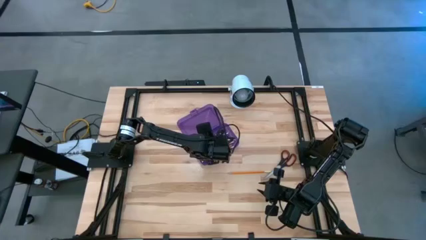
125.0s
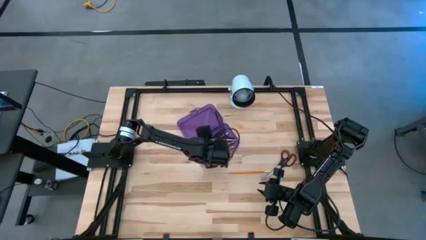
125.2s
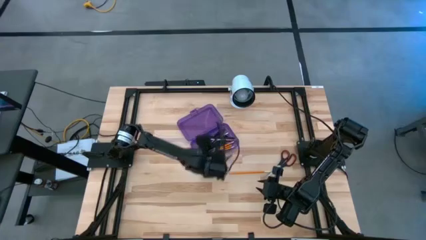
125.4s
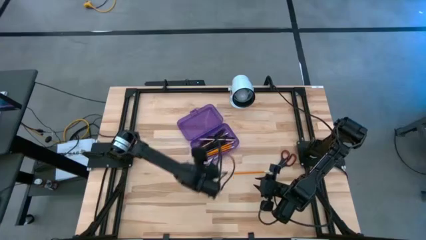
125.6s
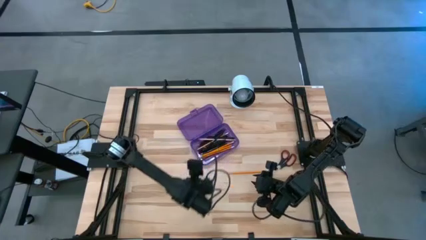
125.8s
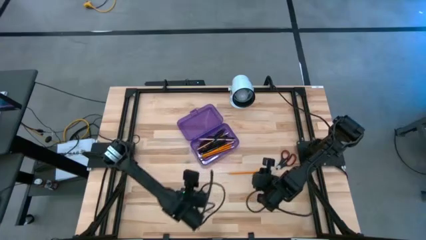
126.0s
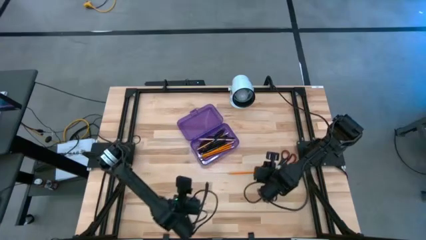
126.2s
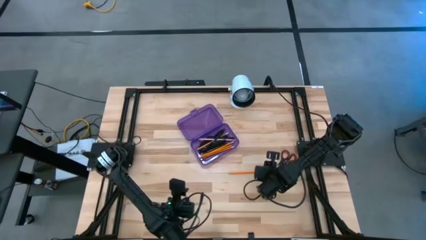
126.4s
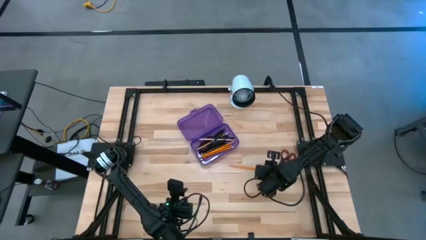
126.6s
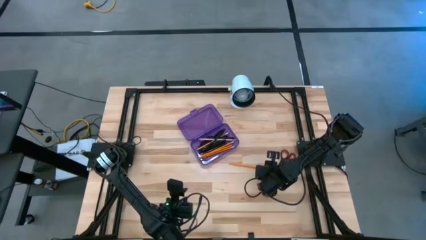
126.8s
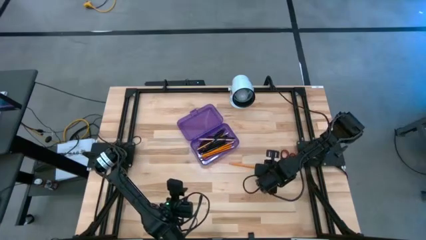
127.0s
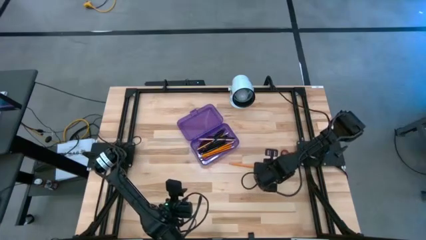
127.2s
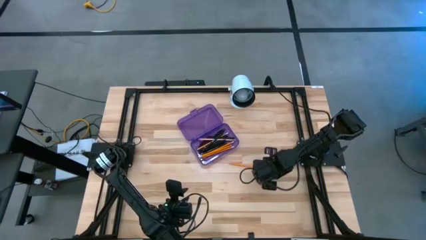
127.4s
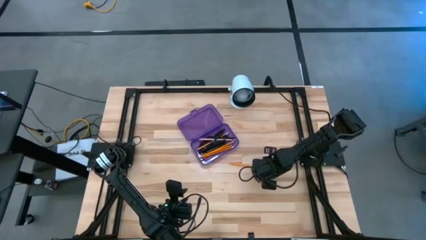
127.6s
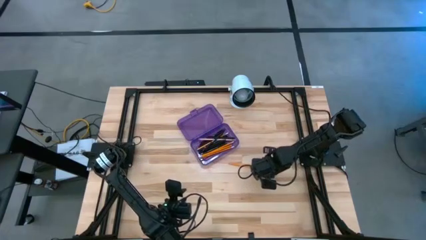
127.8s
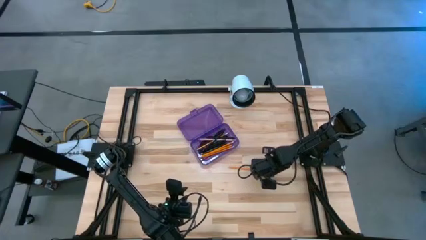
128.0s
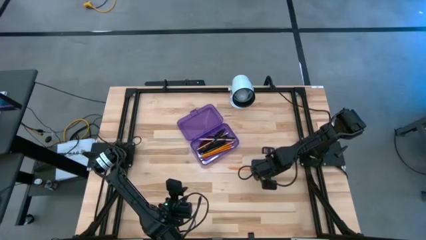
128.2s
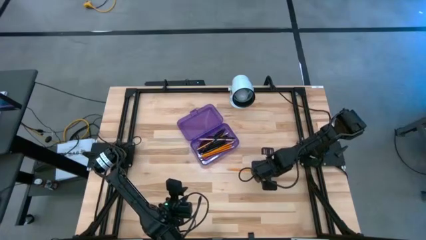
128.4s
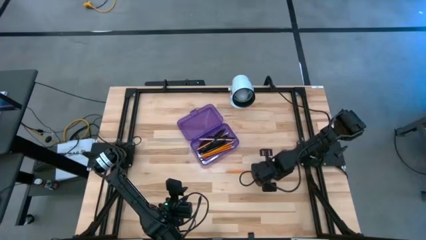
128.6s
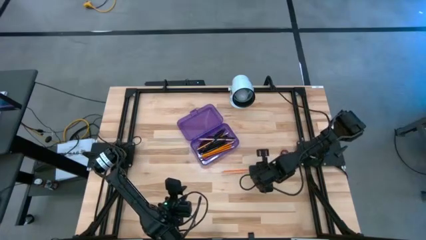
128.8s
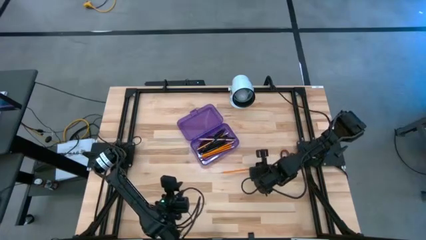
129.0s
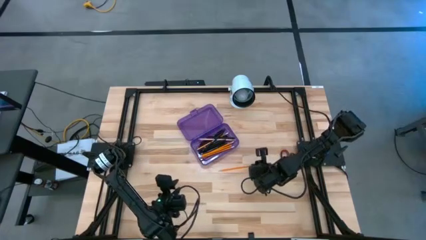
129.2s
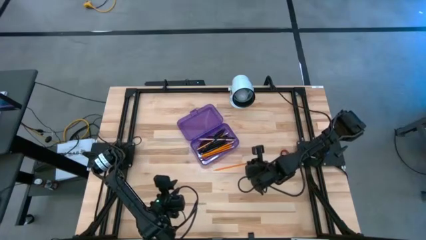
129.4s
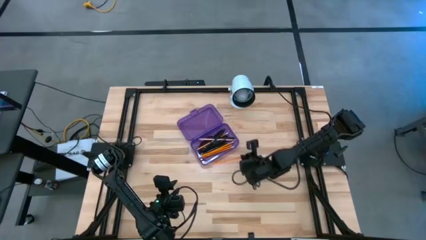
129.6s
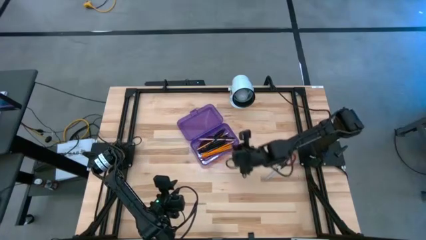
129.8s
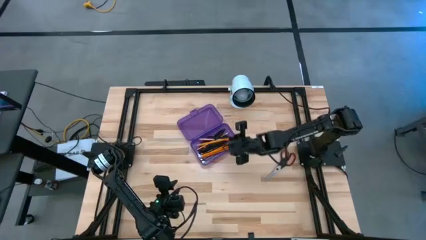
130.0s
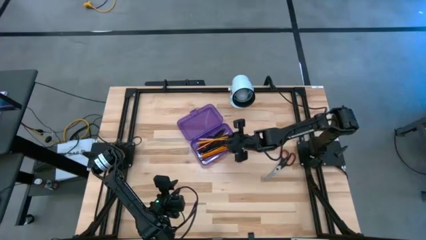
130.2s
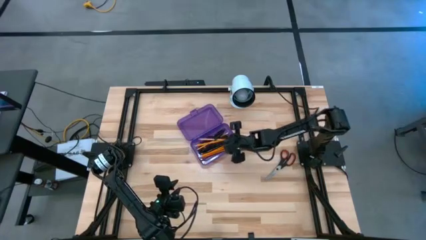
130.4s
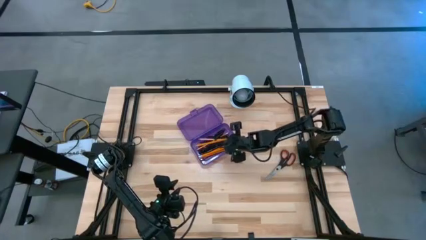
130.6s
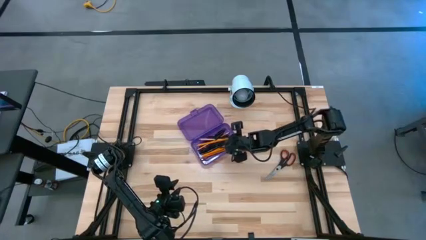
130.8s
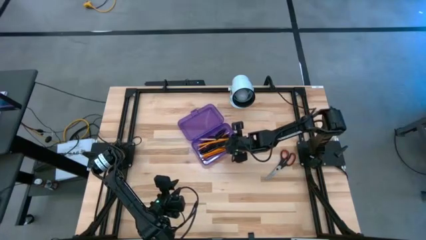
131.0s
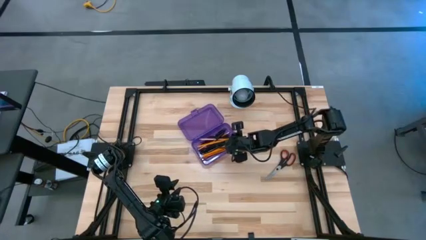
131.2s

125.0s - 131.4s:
Task: Pick & place school supplies into a supply box
Put the orange pencil into the purple supply box

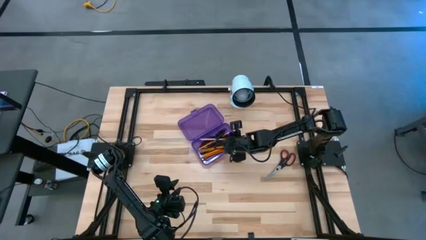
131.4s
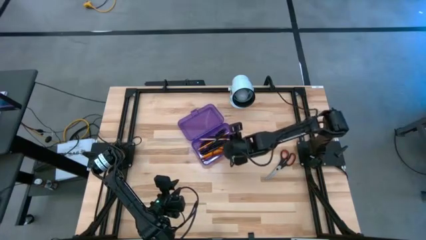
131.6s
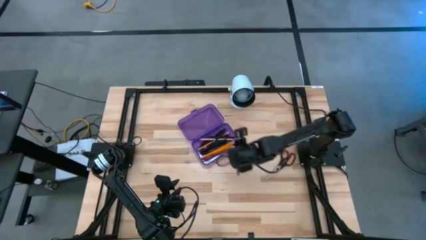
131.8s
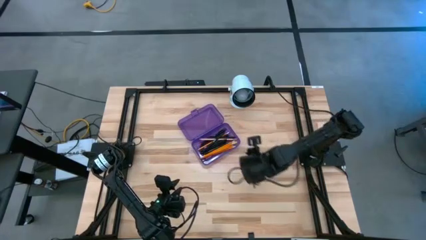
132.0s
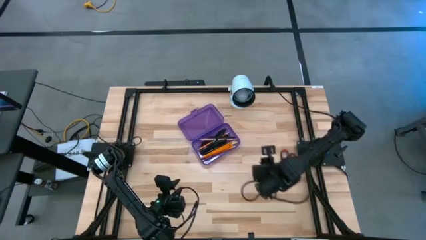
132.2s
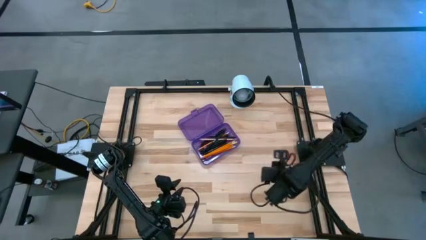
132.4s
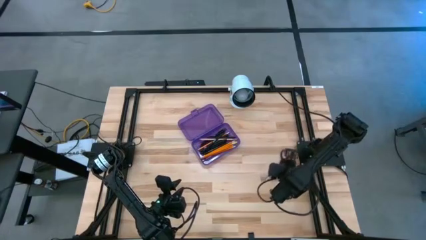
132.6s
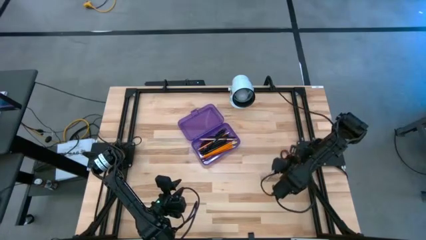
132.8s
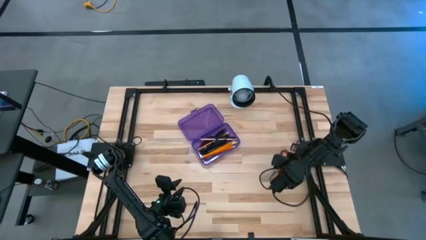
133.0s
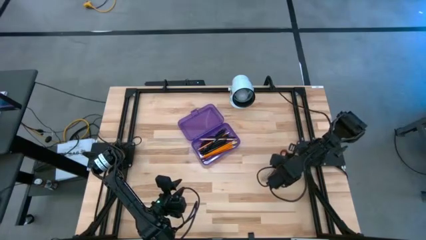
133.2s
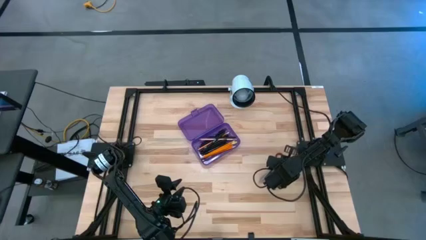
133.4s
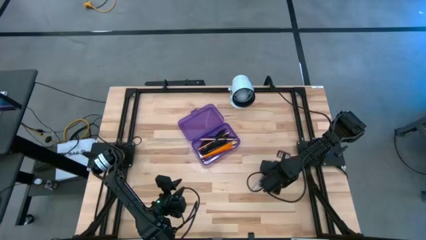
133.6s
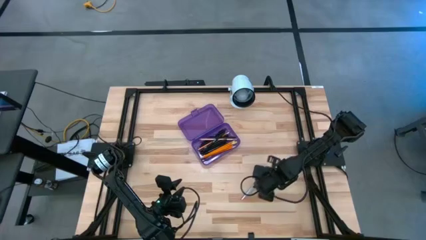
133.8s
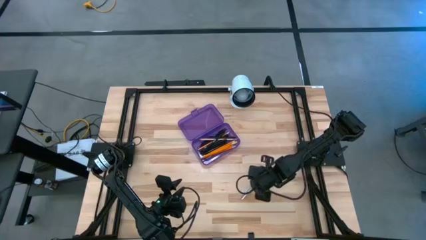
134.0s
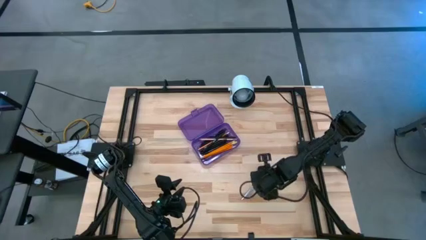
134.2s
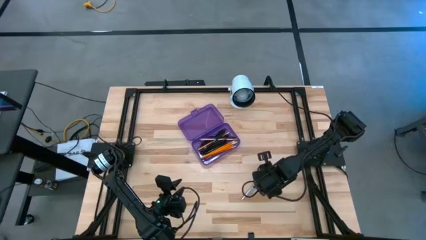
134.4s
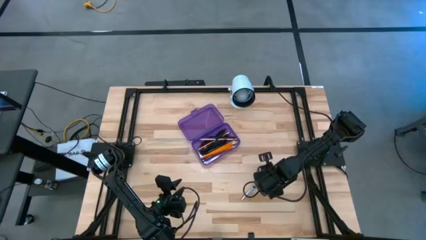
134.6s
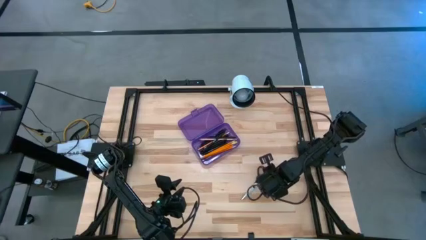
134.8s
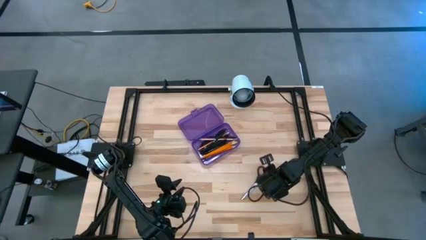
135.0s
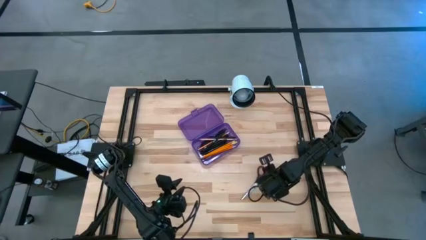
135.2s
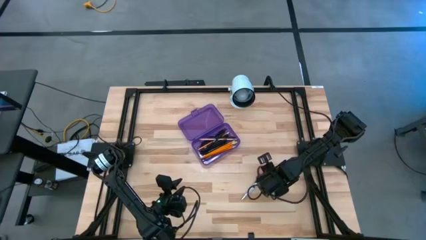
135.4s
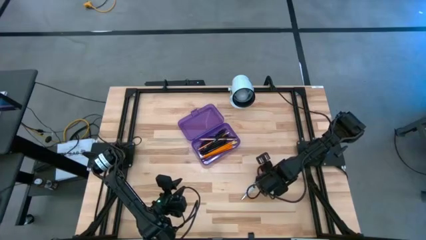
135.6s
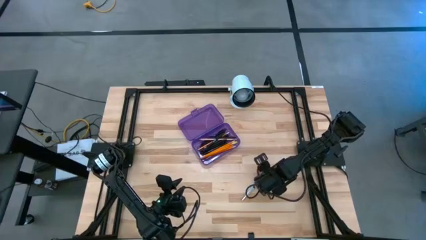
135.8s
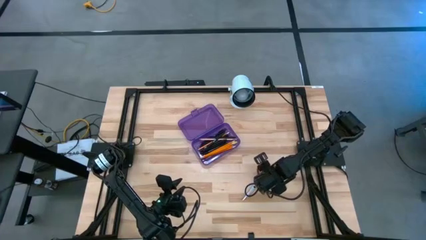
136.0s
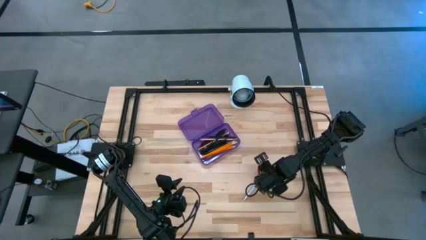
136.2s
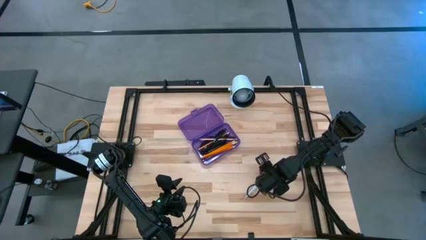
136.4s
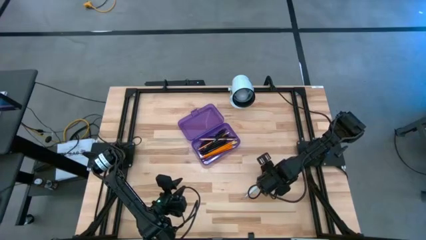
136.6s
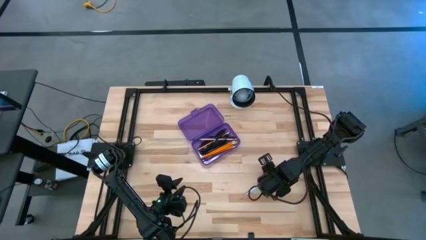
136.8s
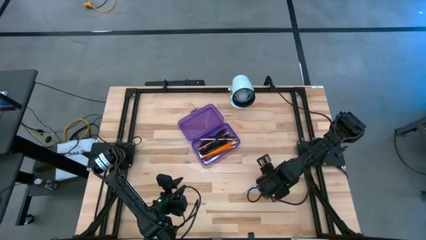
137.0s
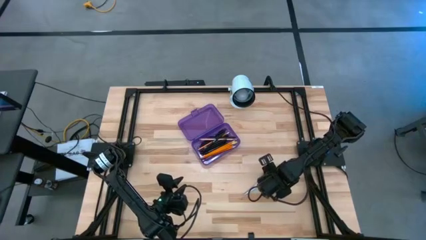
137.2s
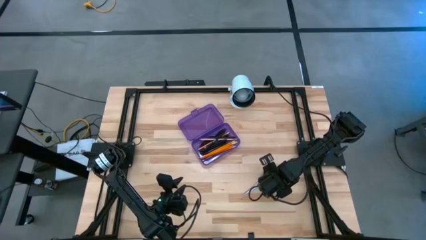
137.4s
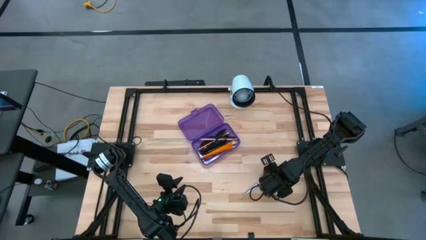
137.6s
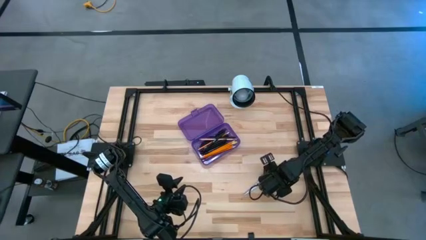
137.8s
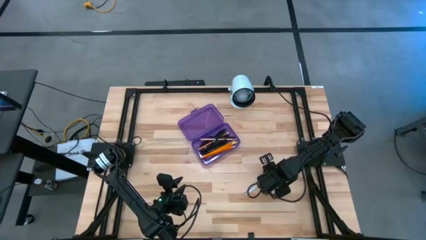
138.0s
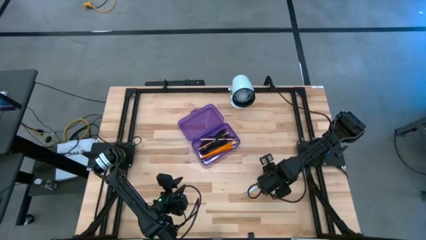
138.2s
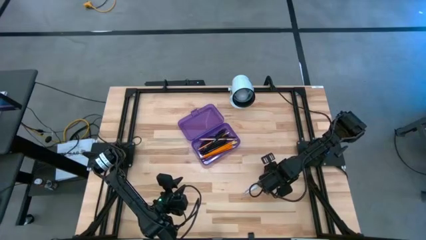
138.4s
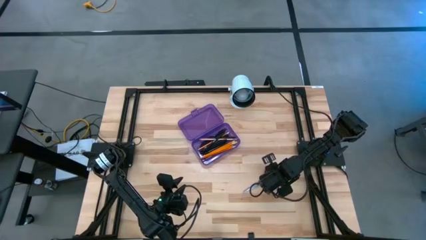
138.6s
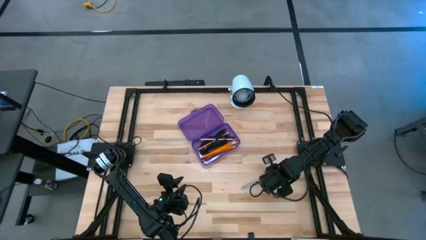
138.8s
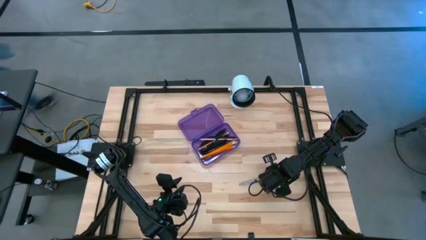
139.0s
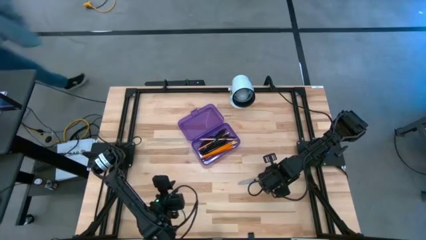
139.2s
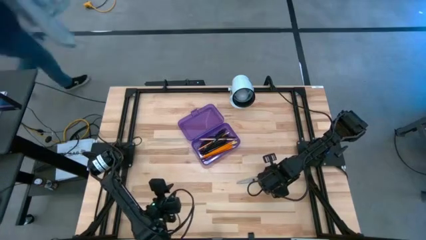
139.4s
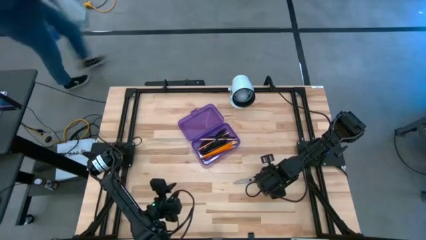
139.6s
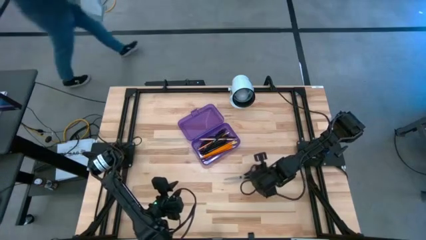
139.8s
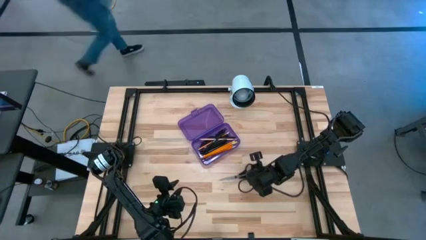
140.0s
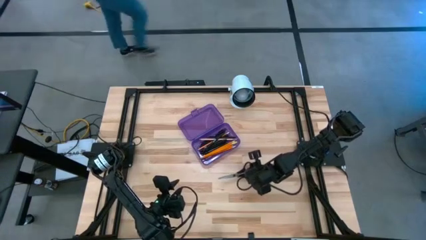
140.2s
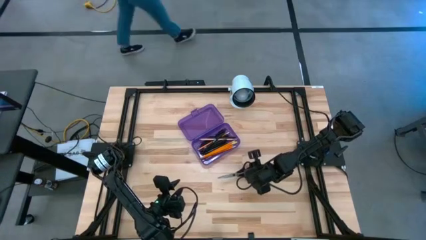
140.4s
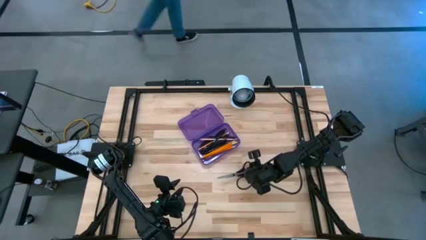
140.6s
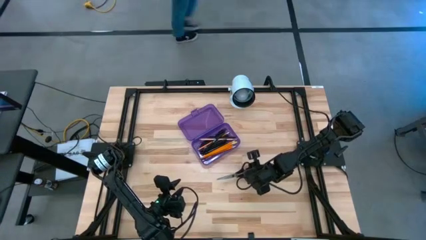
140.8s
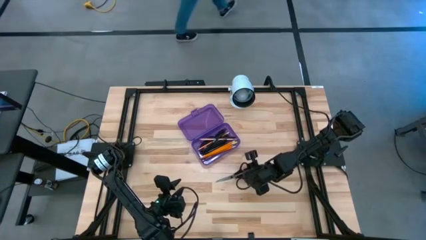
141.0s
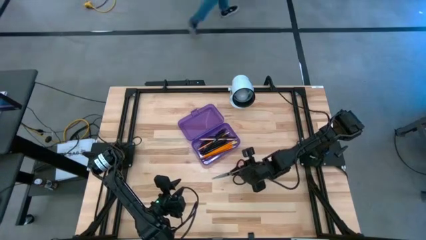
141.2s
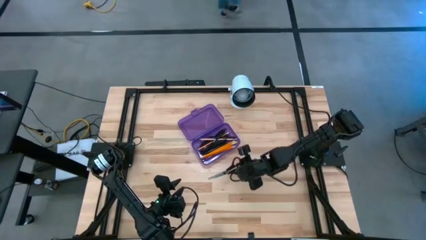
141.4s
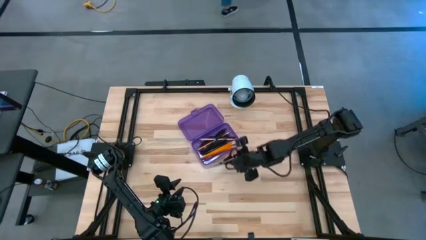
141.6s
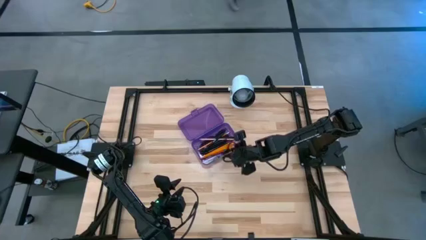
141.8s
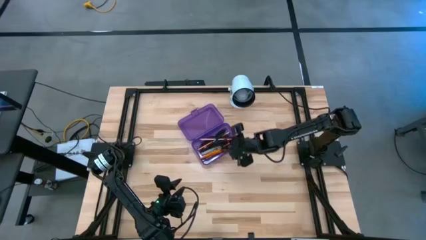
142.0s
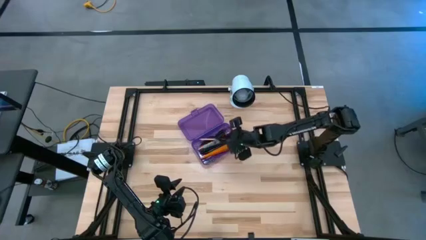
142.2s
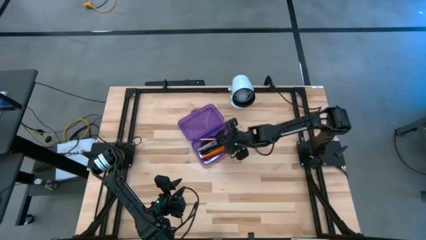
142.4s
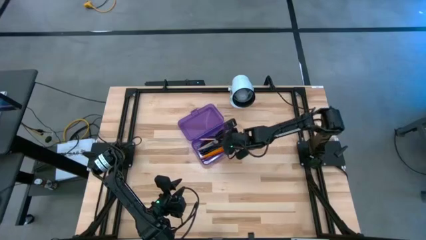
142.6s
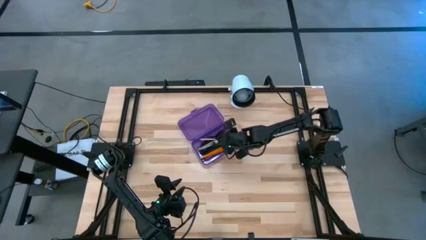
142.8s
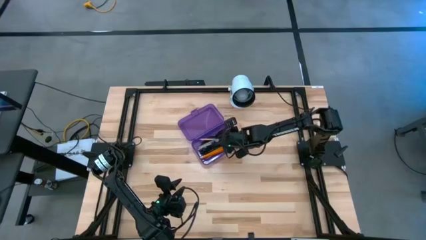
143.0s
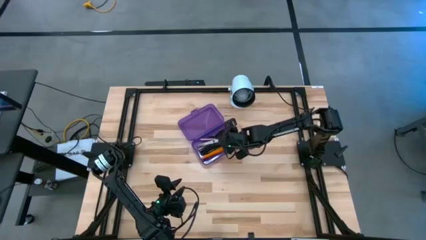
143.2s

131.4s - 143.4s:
Put the black scissors into the purple supply box
